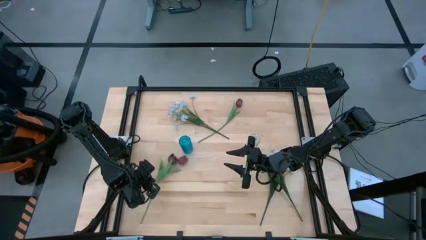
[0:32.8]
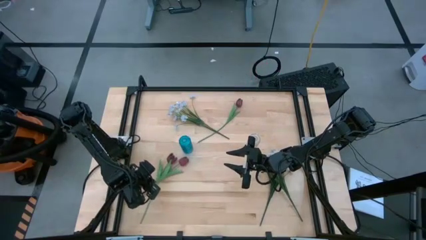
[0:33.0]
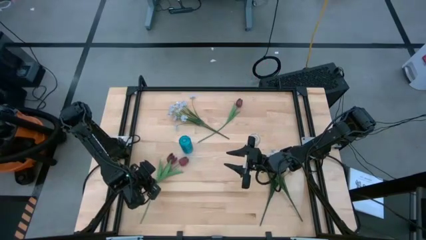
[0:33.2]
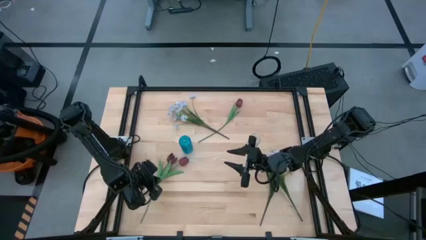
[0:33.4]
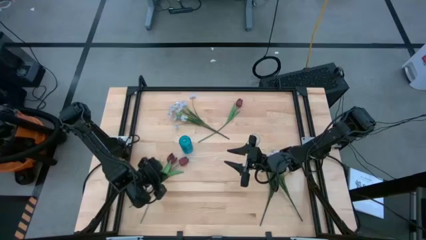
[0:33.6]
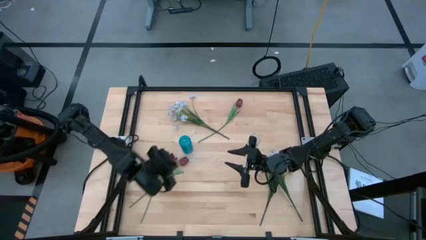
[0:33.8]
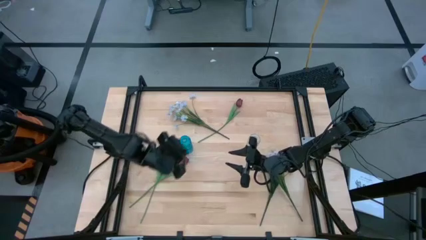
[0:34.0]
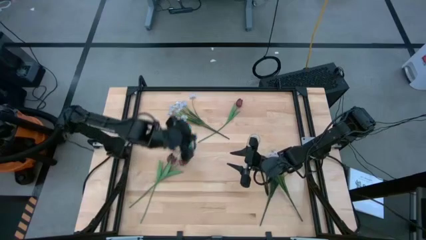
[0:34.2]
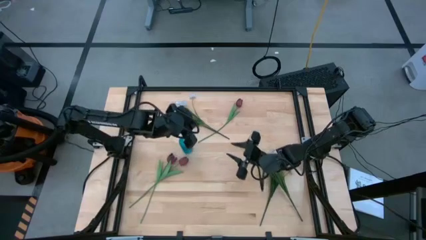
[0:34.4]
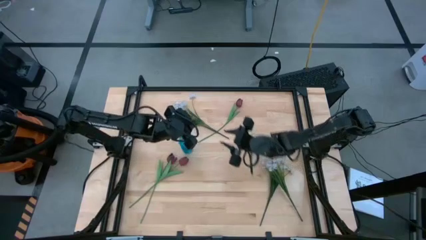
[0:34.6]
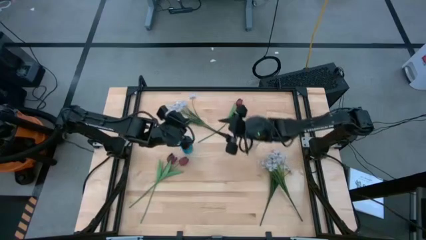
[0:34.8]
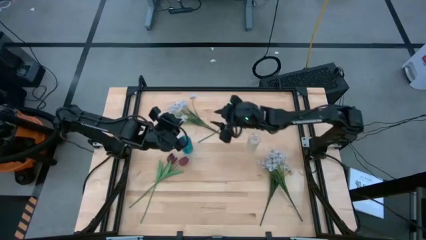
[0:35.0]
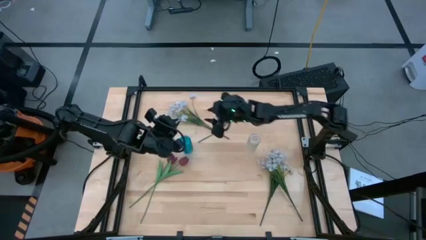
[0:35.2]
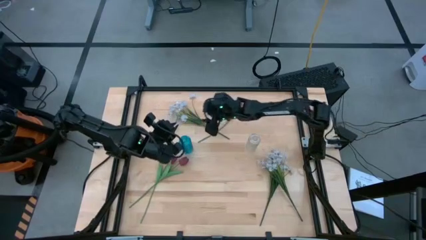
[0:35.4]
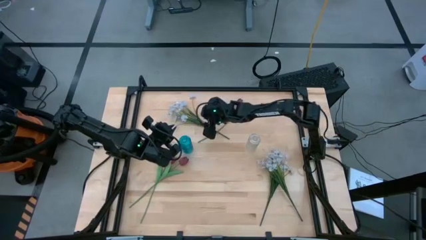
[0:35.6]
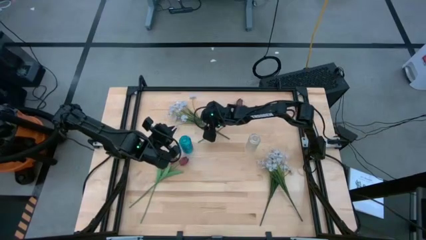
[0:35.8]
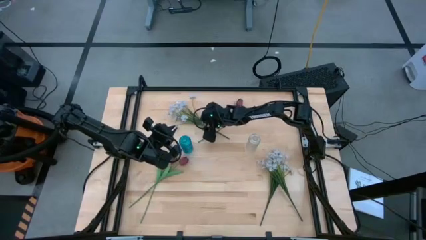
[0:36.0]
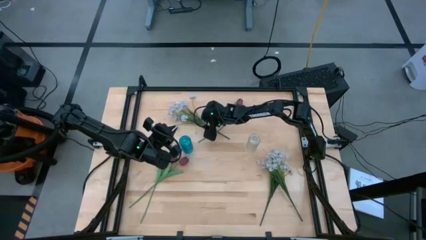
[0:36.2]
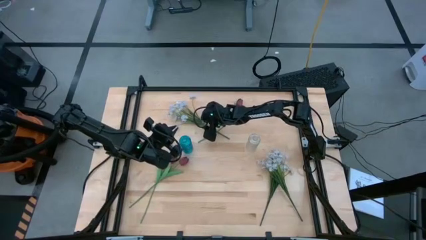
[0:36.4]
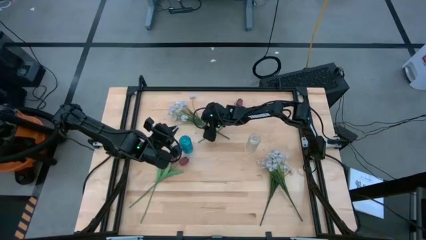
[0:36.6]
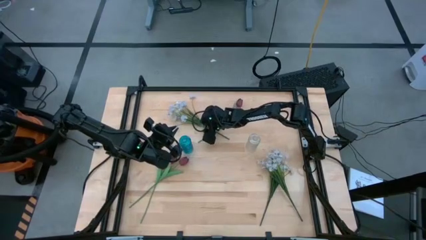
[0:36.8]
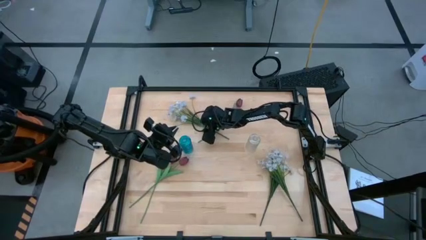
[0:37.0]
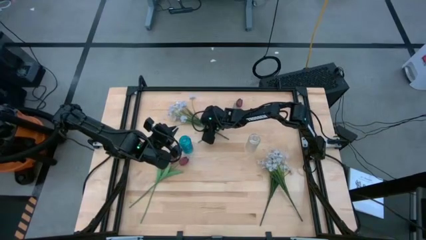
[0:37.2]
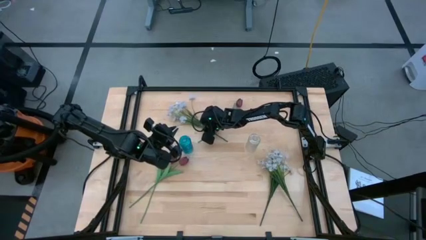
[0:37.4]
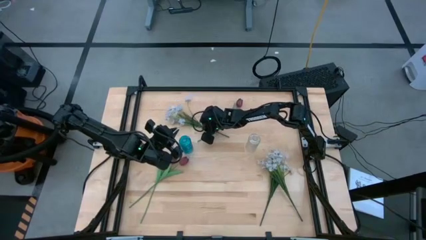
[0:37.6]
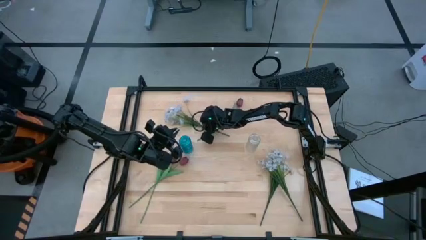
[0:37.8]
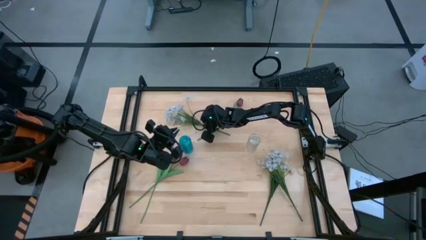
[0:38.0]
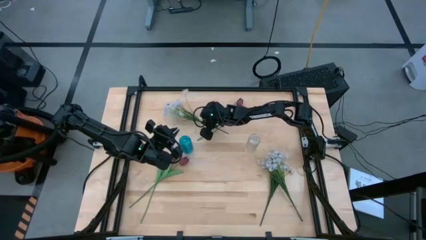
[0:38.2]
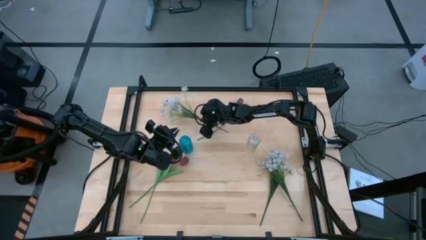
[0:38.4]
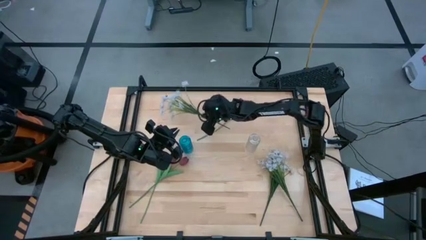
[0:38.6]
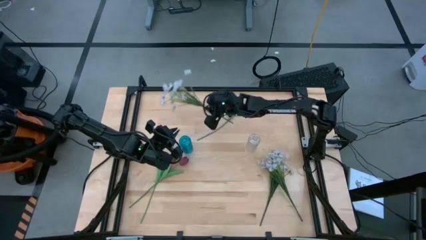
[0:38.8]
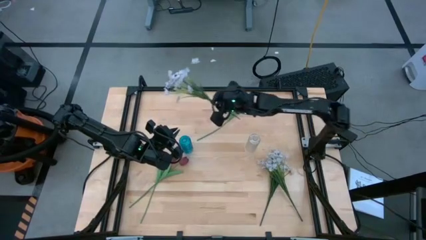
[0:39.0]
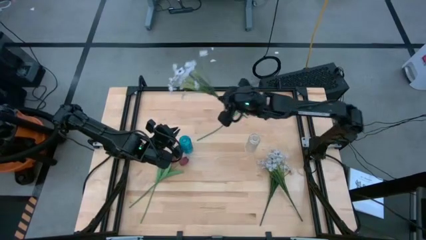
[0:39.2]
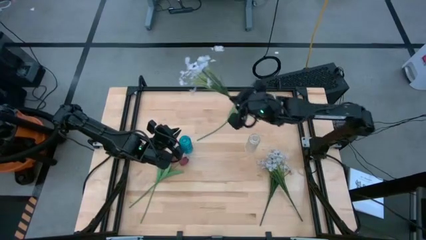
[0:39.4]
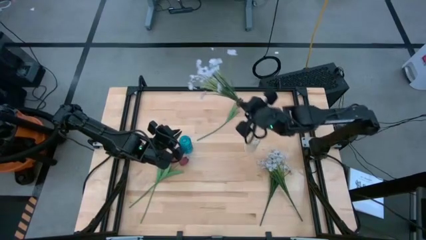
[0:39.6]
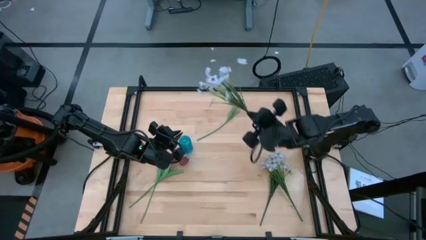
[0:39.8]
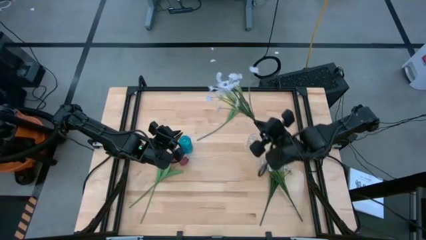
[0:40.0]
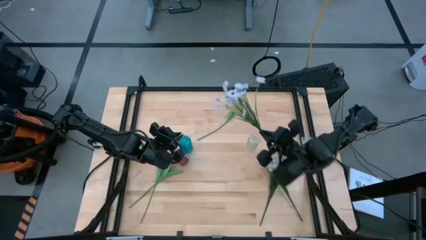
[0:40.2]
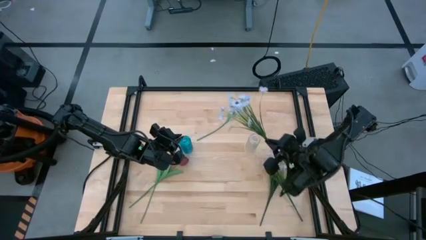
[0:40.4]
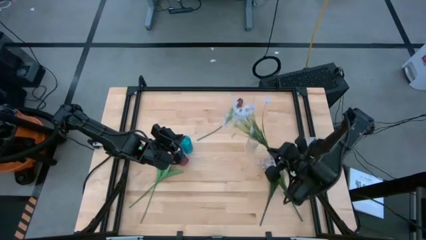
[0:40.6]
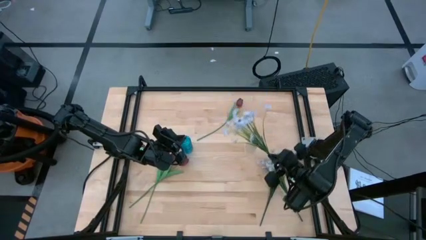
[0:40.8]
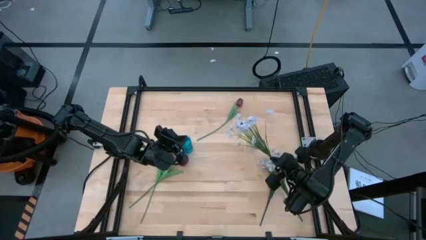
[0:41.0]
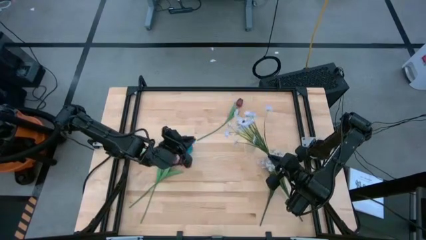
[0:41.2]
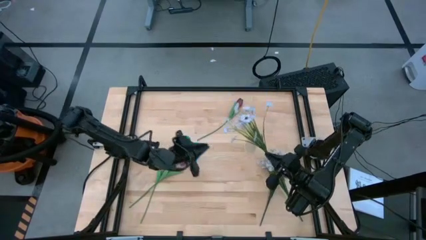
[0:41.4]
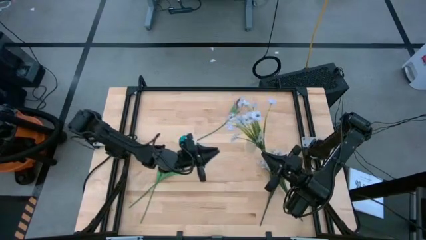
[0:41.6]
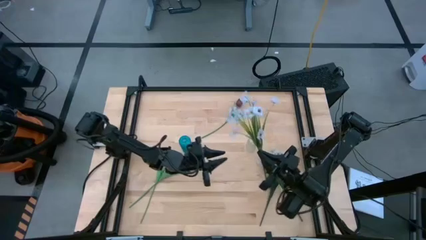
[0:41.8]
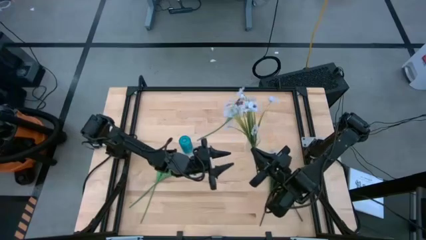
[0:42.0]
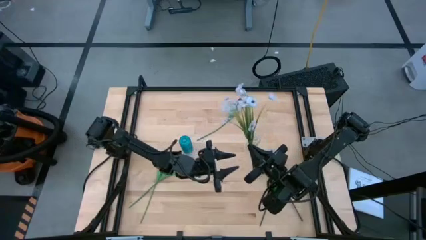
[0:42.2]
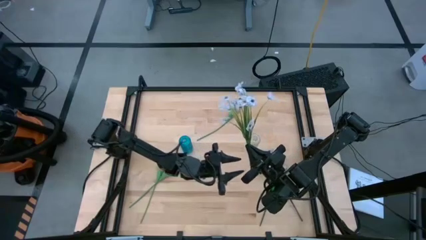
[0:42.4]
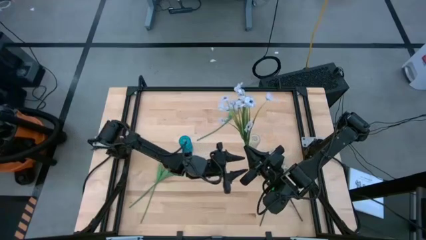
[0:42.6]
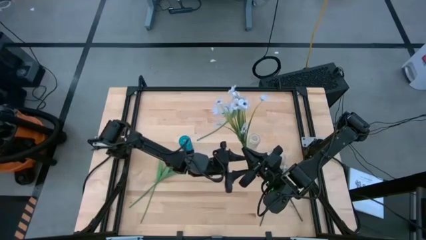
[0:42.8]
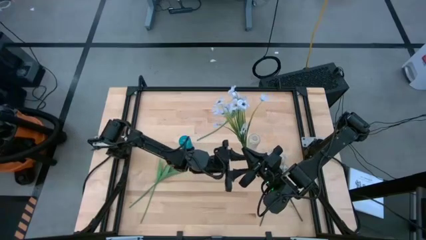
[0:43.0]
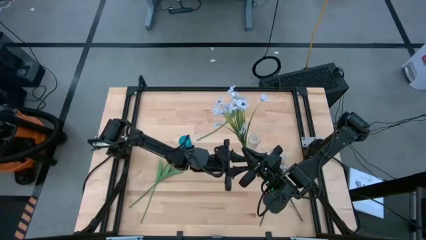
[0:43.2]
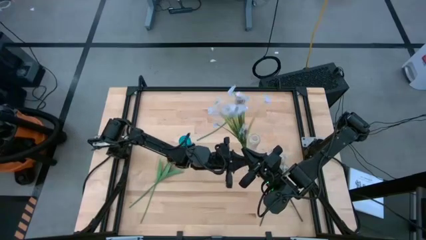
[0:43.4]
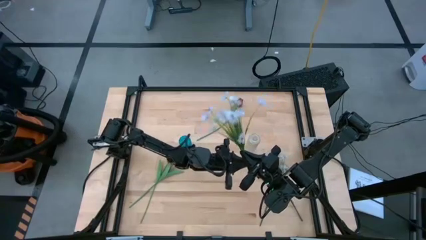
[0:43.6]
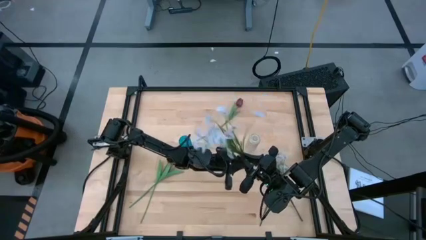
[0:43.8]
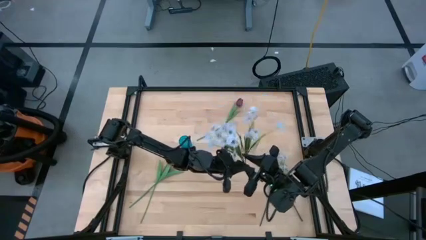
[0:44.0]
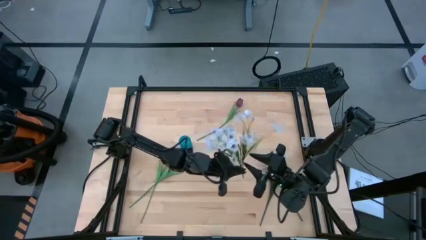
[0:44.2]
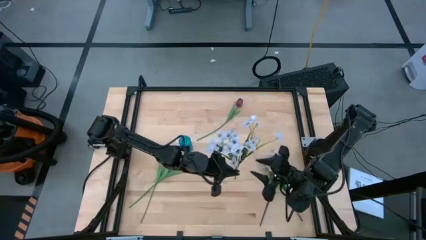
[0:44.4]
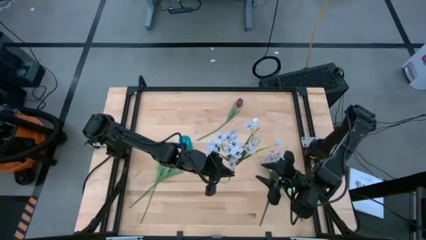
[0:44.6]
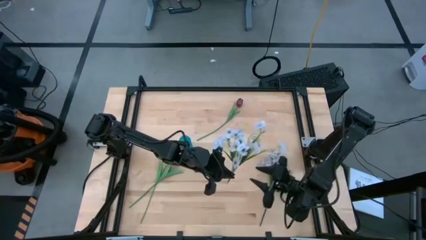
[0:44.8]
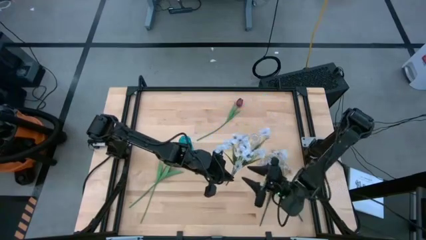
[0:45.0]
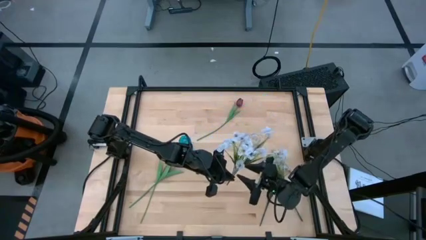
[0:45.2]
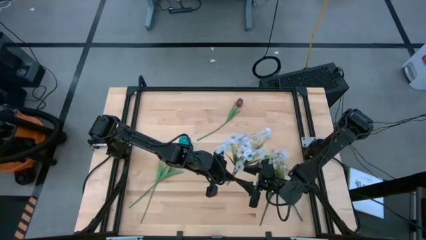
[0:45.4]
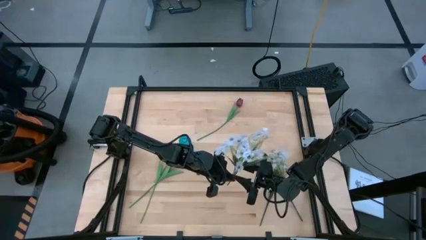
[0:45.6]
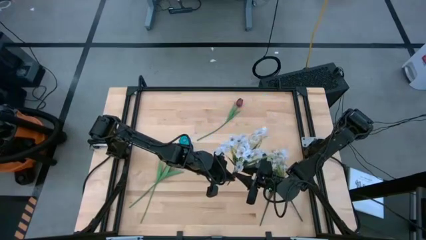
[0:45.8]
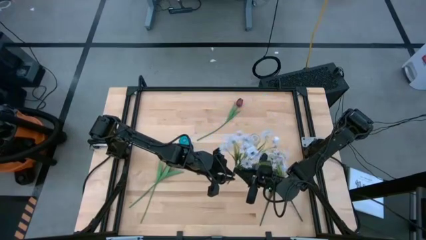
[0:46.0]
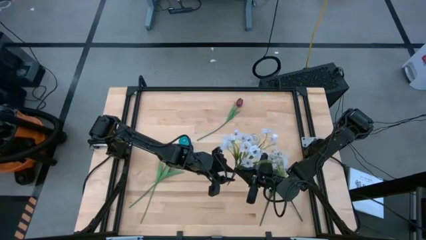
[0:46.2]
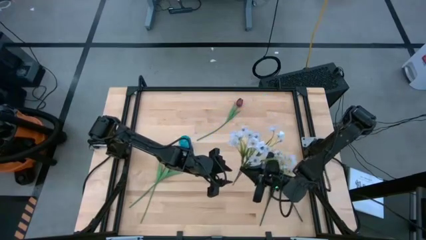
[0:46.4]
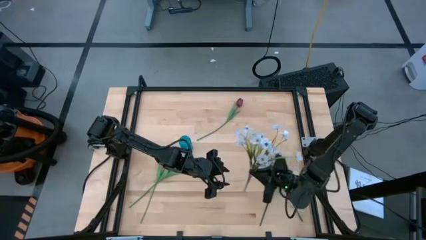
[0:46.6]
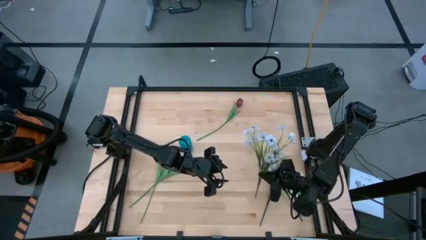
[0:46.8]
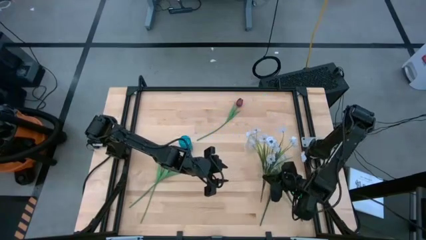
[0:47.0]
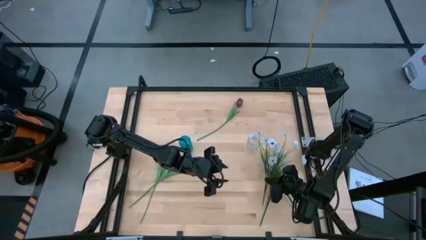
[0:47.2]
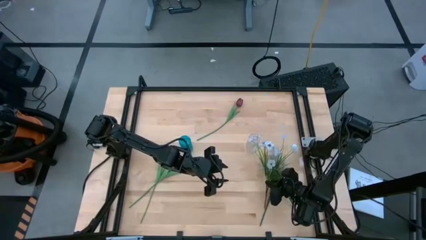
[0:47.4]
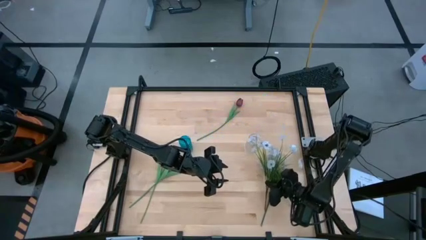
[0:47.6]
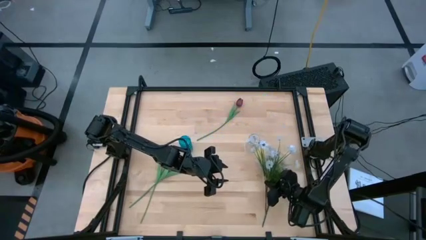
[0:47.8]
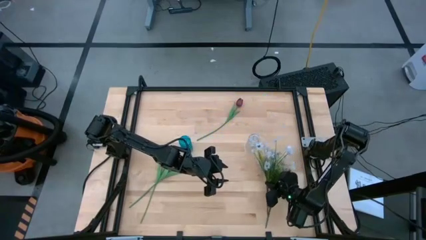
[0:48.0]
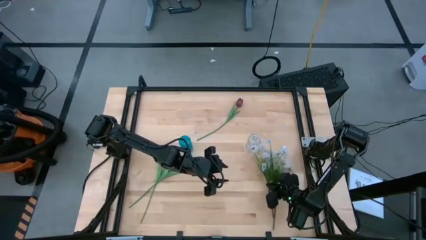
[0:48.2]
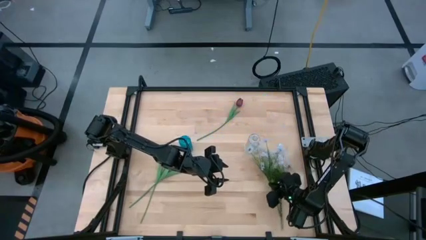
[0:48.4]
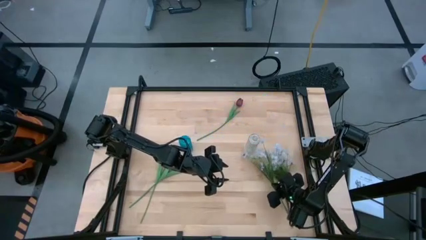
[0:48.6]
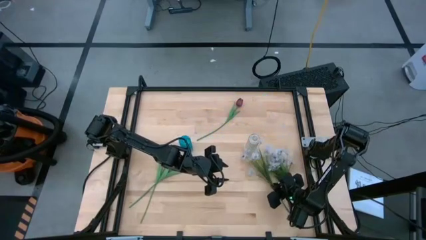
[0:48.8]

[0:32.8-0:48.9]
Task: Sort flowers into vase by color
Move the top white daisies to the bottom right of the table

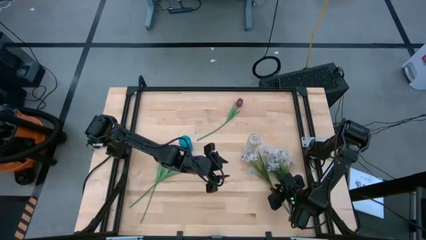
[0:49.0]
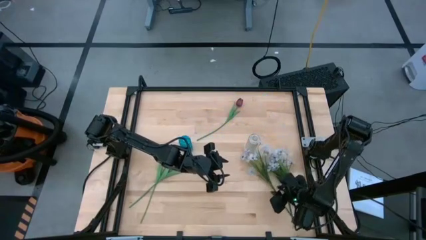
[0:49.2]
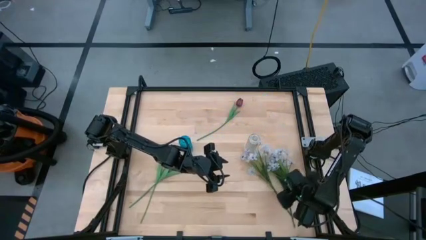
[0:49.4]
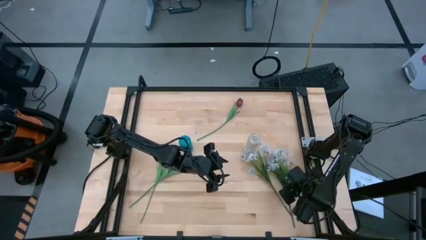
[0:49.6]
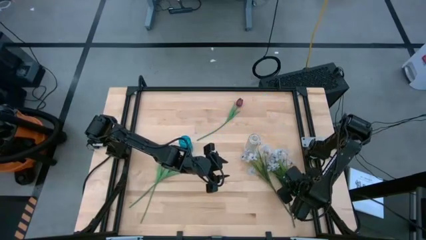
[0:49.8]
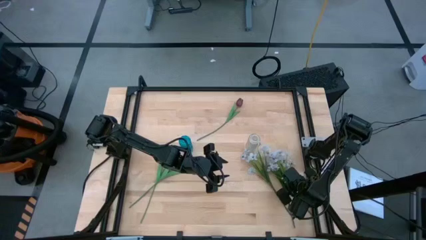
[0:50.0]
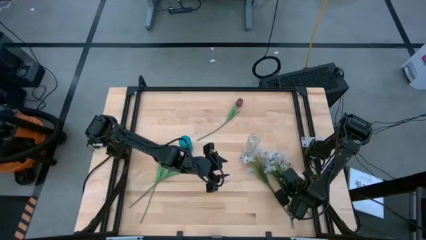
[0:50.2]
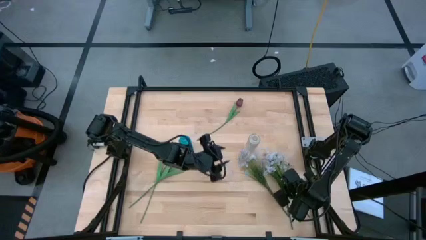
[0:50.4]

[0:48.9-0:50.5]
Adjust the bottom right white flowers
